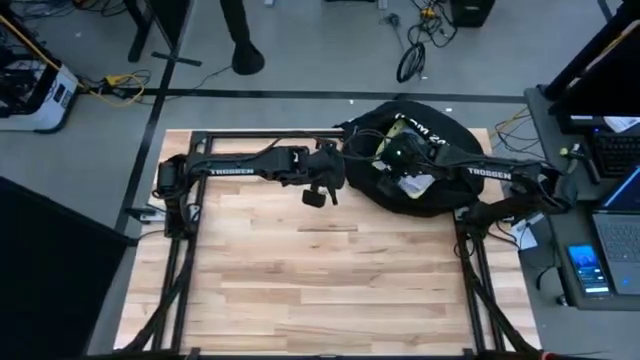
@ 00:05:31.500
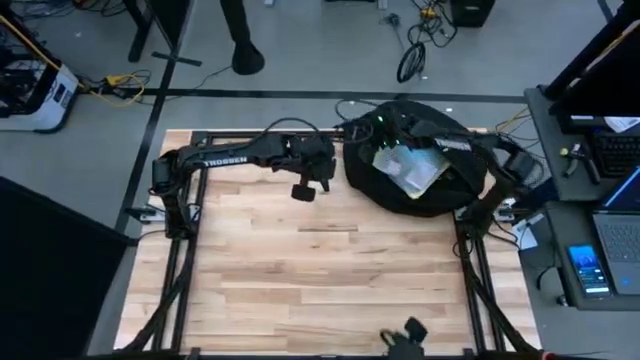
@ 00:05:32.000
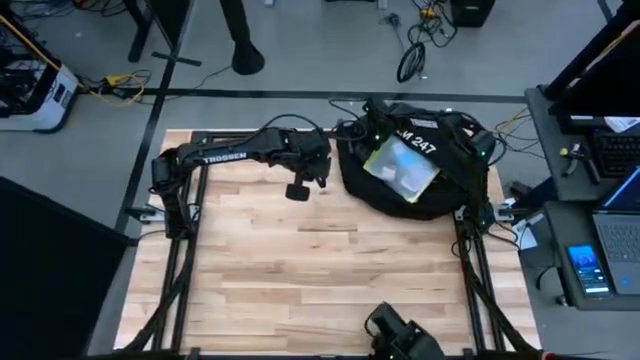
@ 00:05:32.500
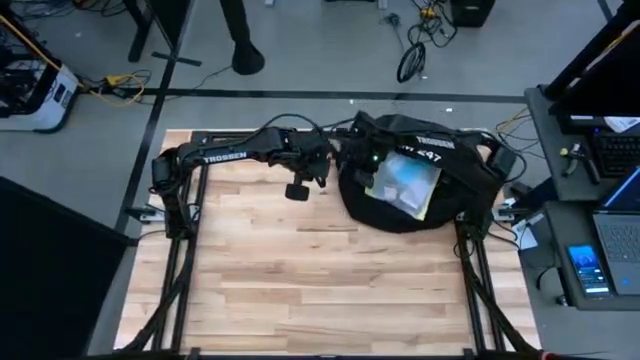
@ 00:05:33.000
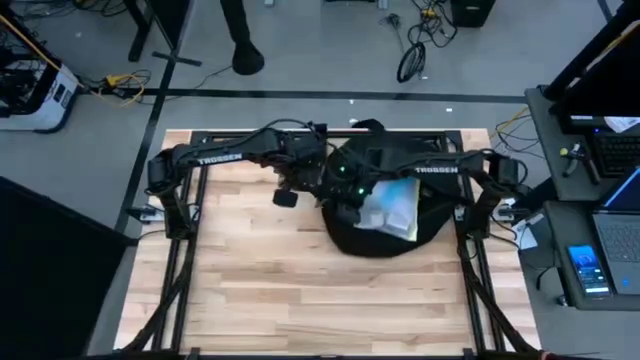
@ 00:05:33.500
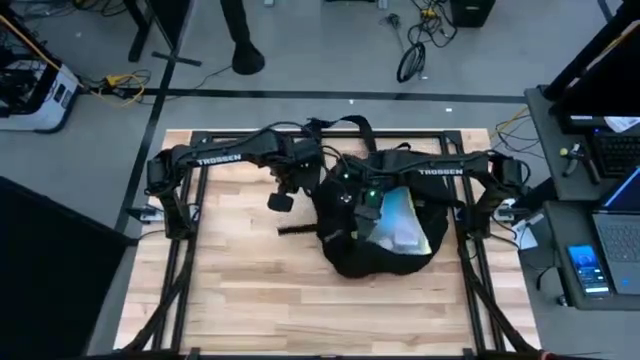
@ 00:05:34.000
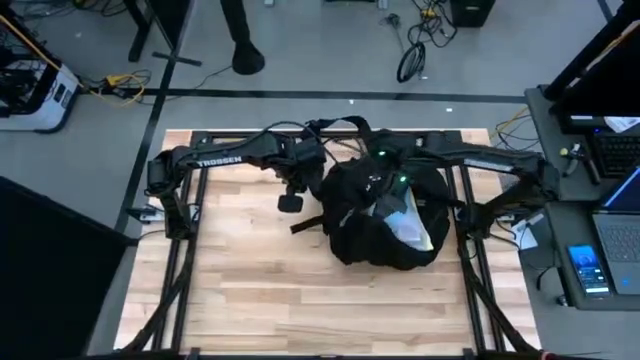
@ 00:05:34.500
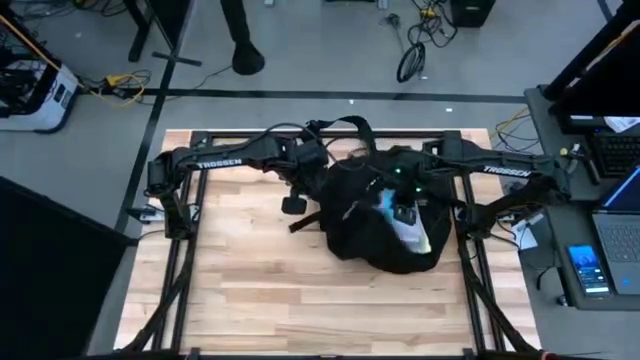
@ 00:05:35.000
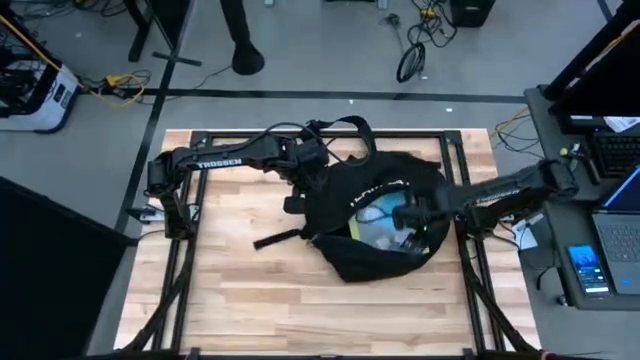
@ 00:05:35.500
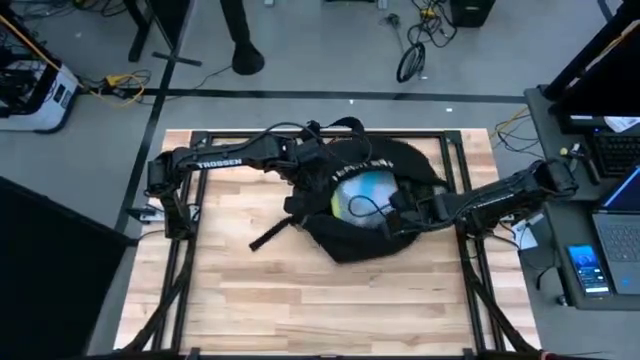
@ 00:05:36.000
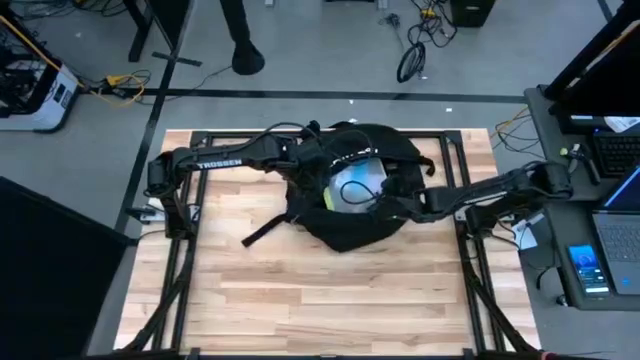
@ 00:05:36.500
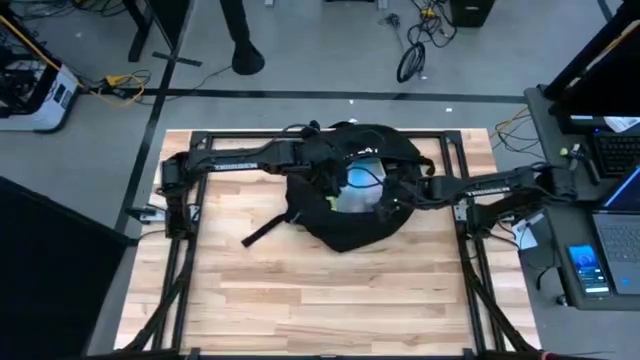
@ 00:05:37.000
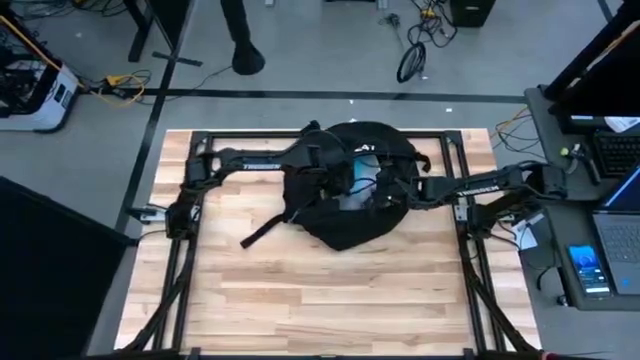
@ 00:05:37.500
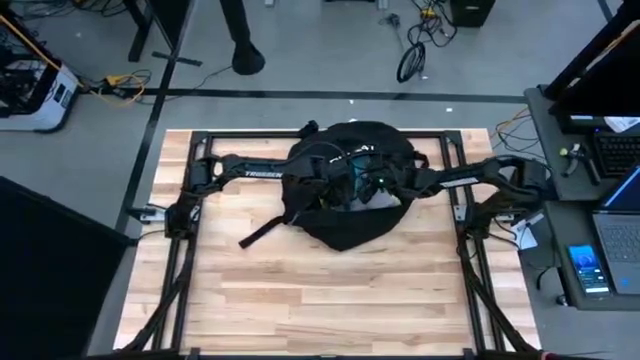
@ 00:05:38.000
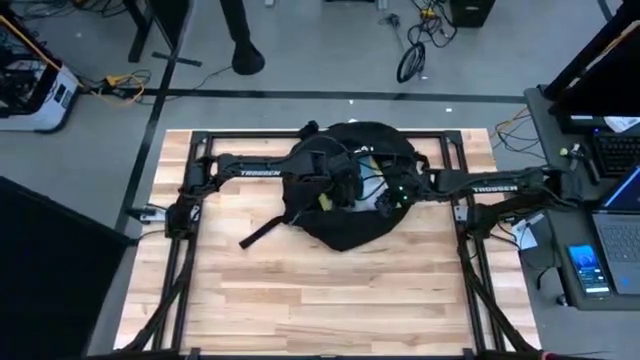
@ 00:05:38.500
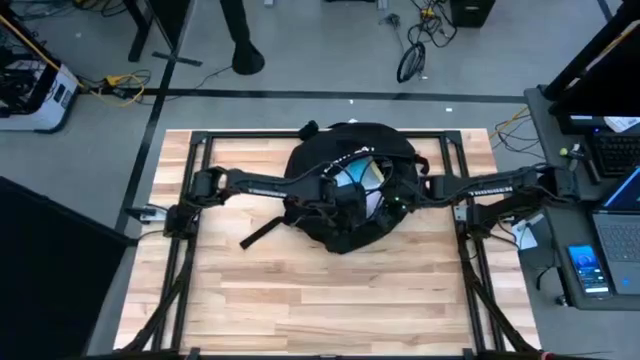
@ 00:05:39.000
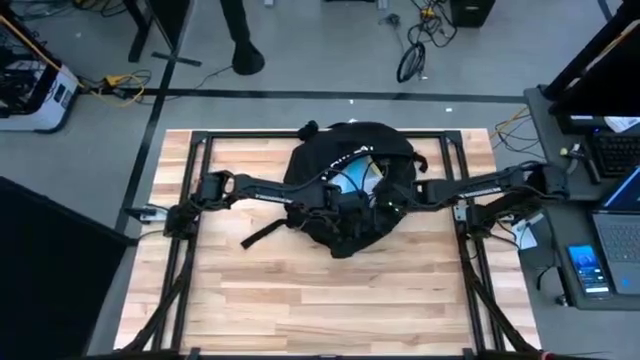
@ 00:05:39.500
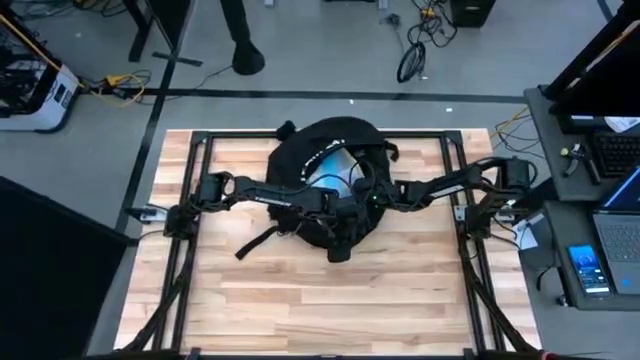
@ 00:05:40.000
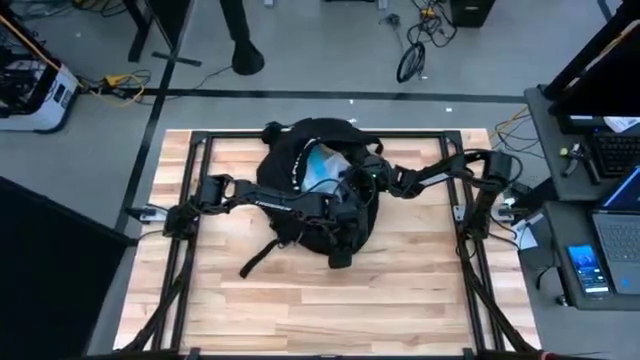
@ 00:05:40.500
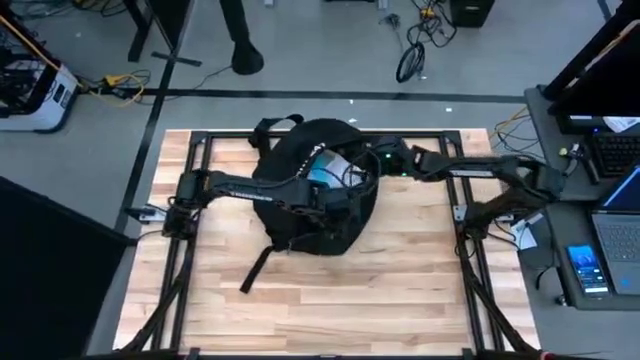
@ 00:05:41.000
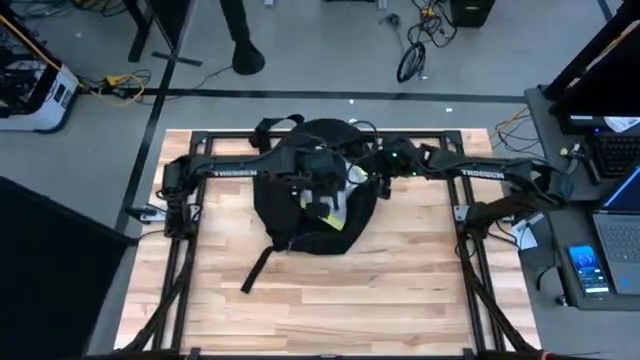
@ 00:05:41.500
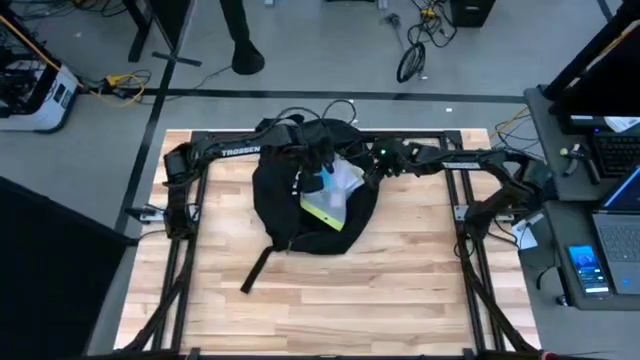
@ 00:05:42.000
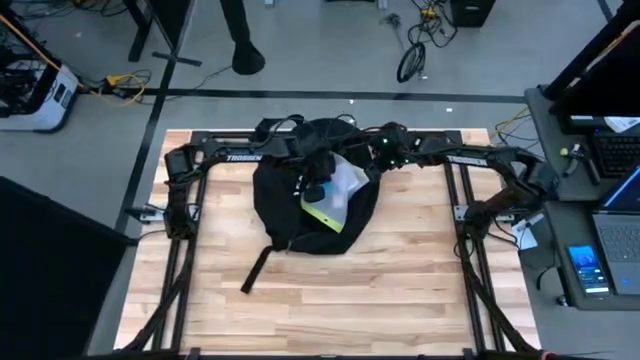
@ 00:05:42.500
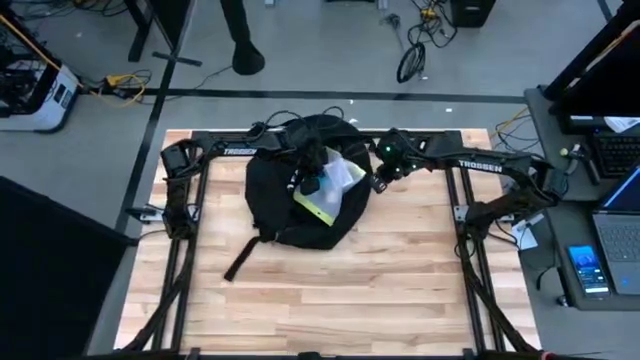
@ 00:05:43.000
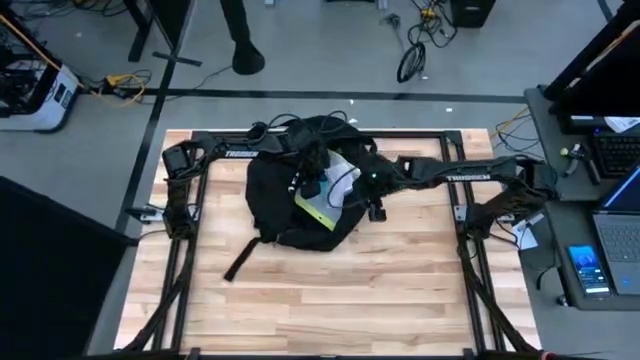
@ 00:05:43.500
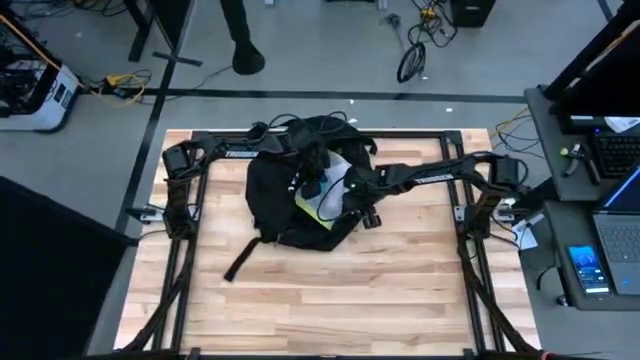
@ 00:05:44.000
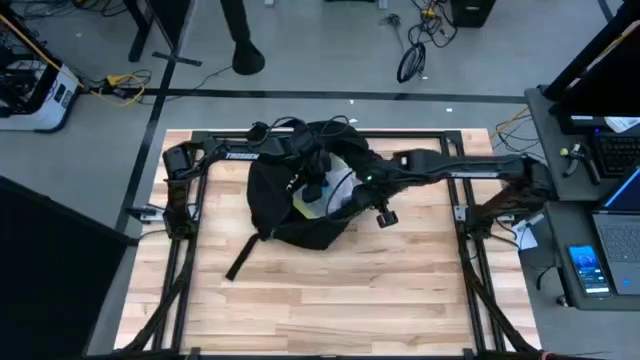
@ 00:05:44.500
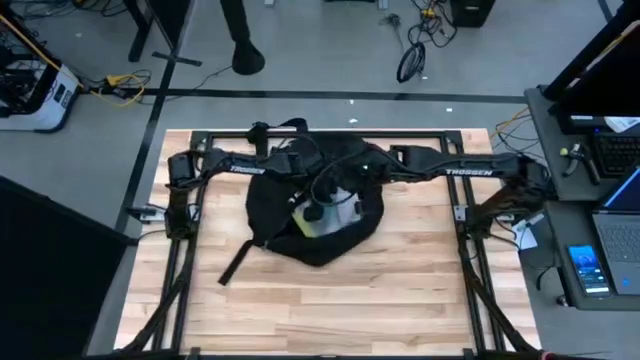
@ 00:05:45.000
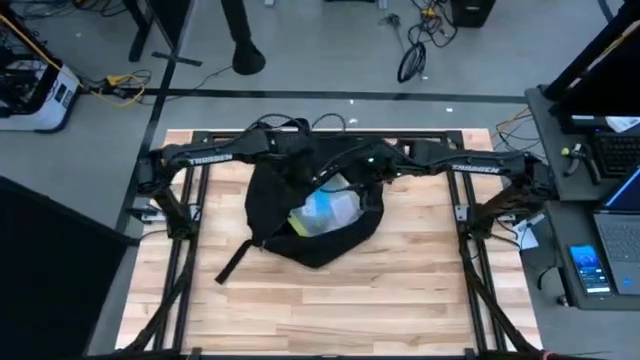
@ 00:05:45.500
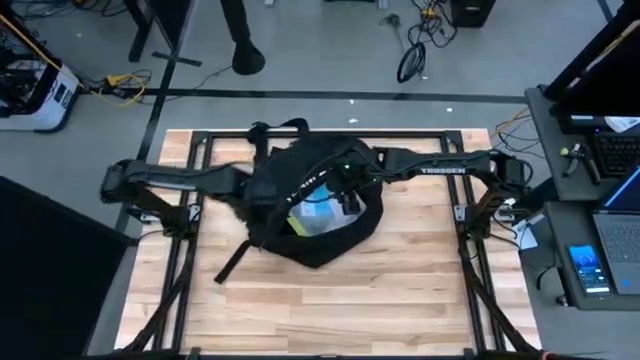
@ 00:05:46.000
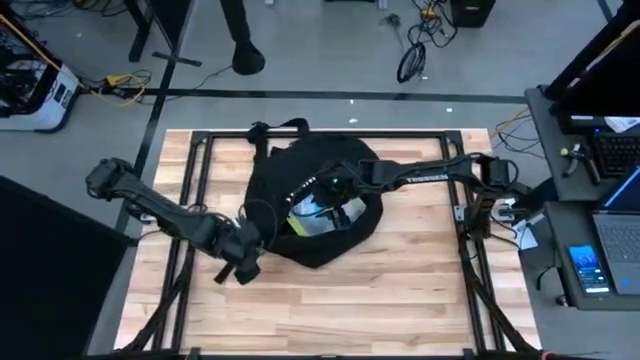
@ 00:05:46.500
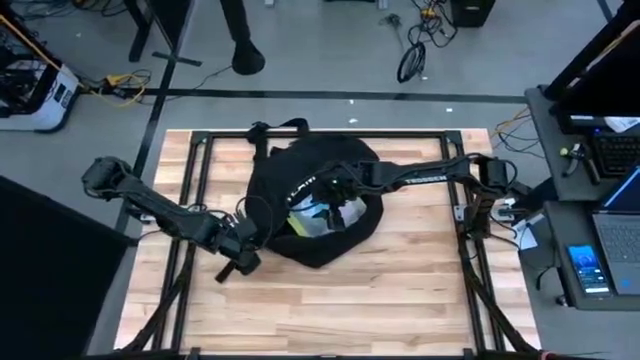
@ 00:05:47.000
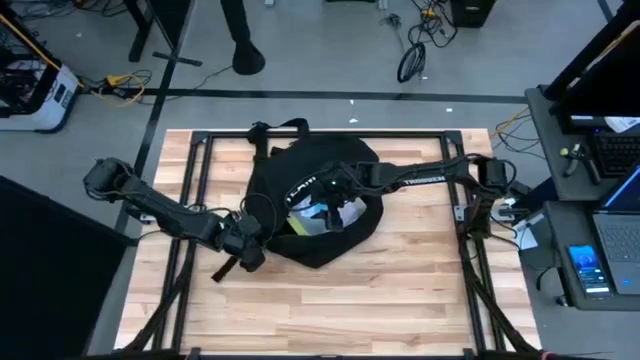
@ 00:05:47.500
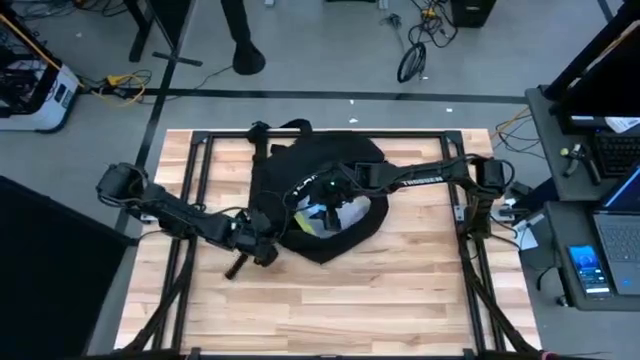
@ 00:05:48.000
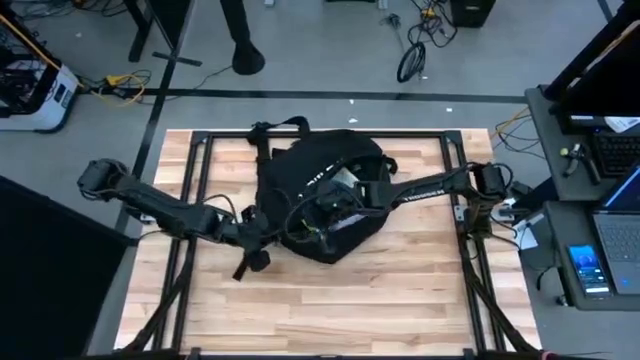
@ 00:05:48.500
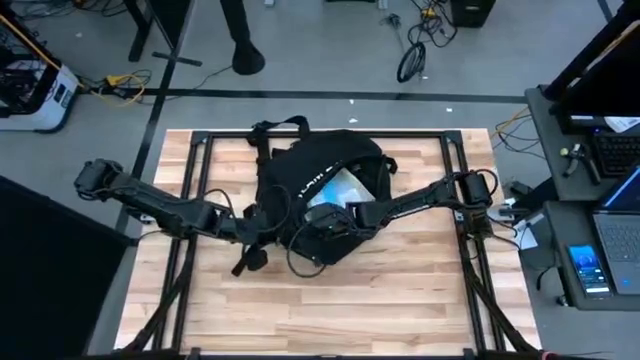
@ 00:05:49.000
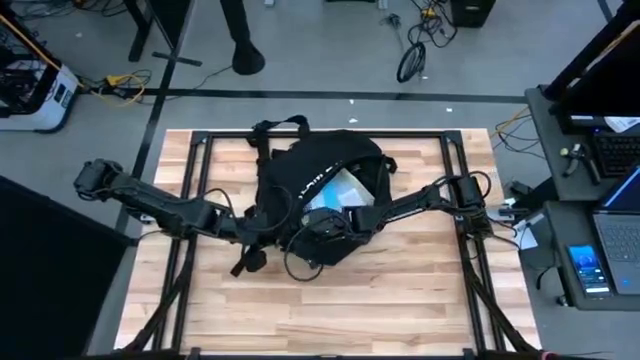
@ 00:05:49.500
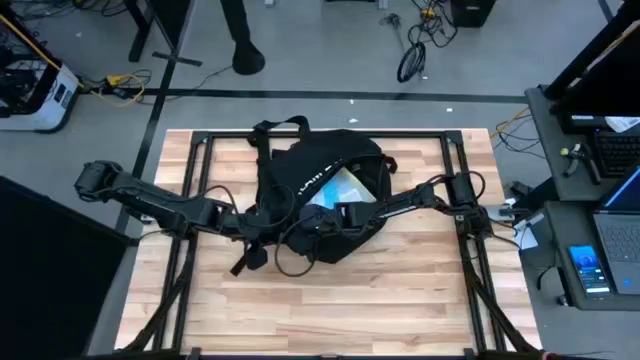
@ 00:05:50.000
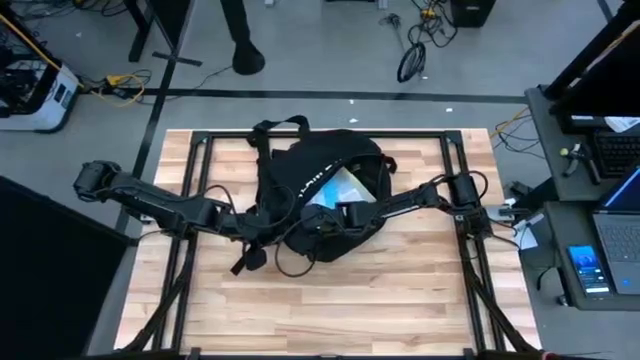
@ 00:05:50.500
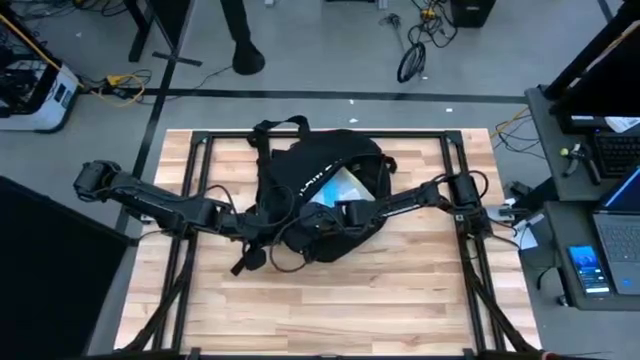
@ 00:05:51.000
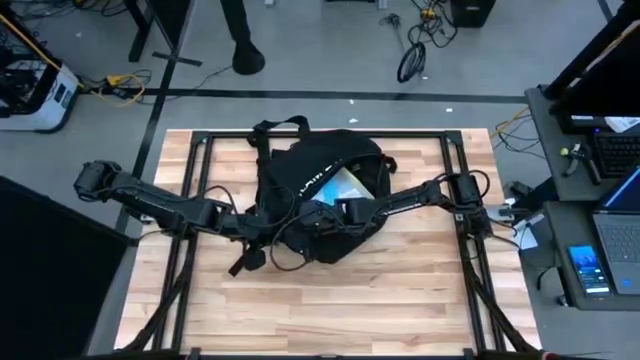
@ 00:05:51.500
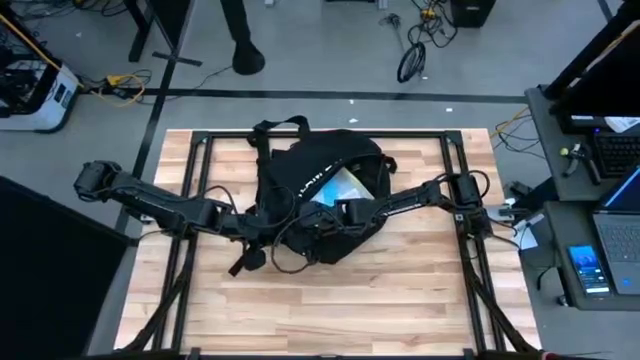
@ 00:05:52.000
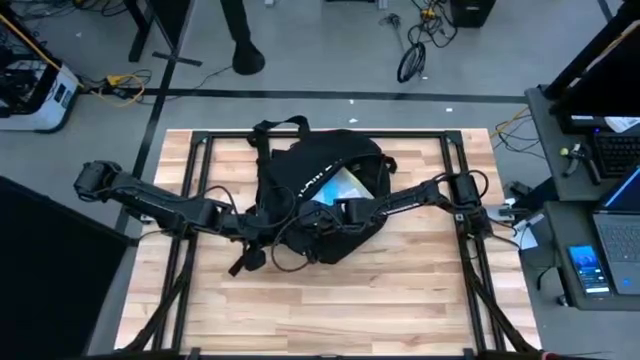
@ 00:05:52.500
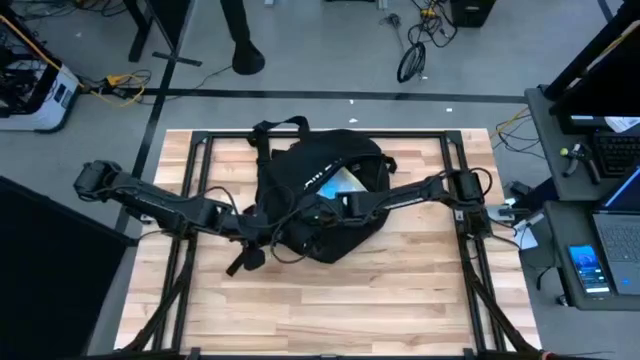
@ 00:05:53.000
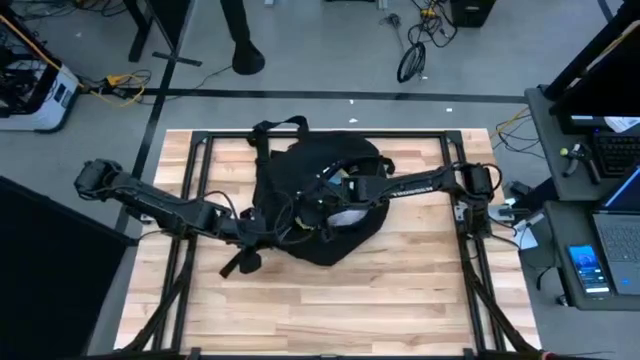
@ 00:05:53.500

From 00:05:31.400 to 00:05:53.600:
Task: Unpack backpack
Close the black backpack
